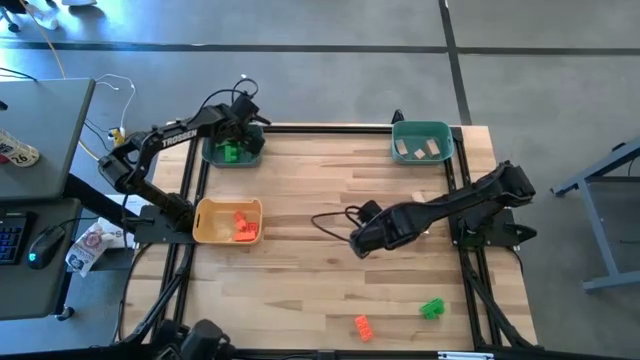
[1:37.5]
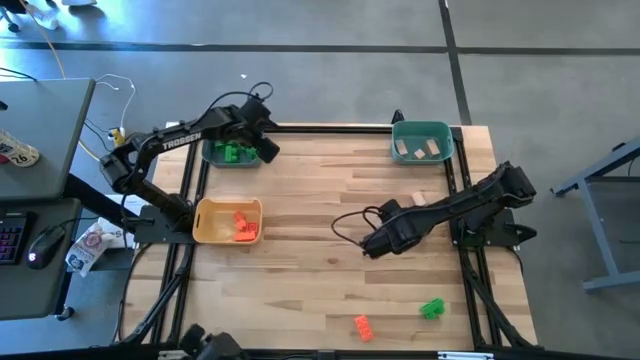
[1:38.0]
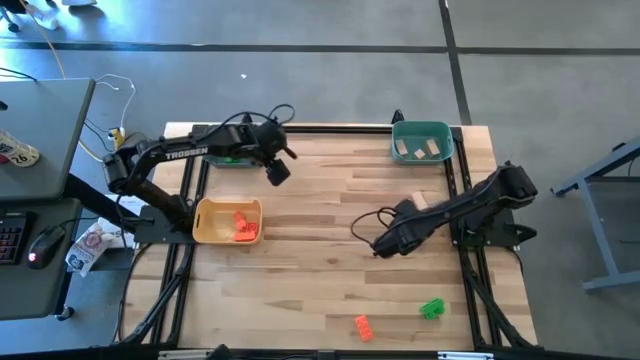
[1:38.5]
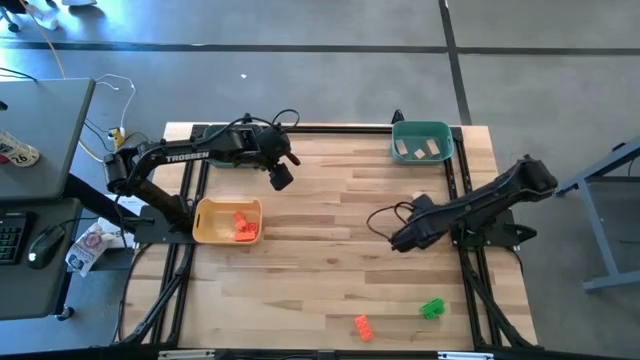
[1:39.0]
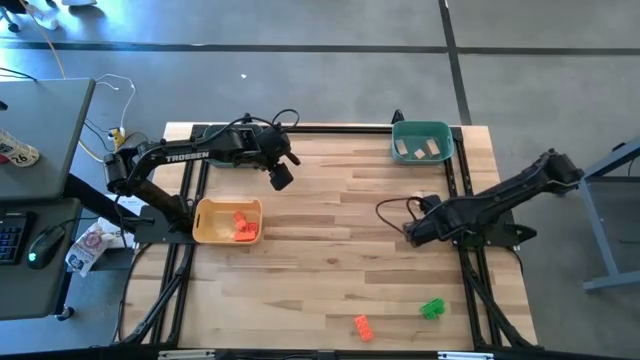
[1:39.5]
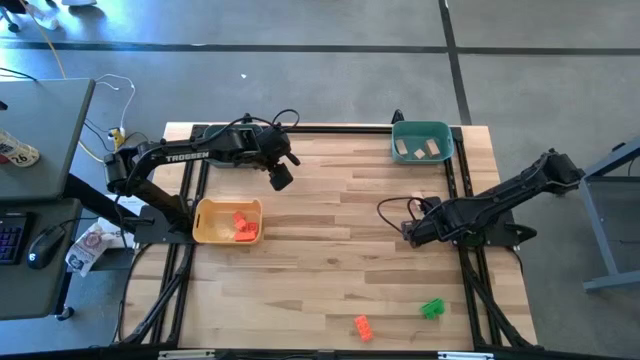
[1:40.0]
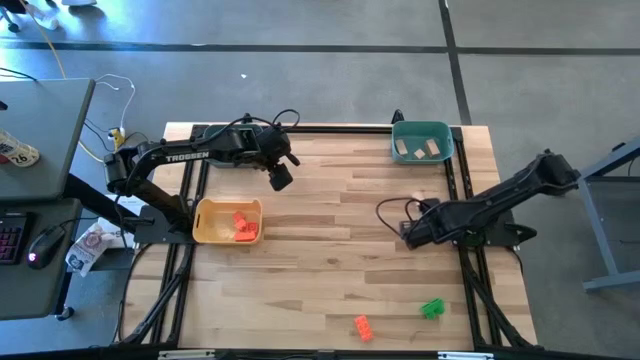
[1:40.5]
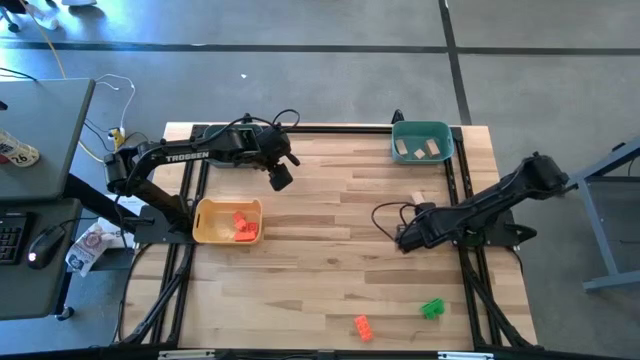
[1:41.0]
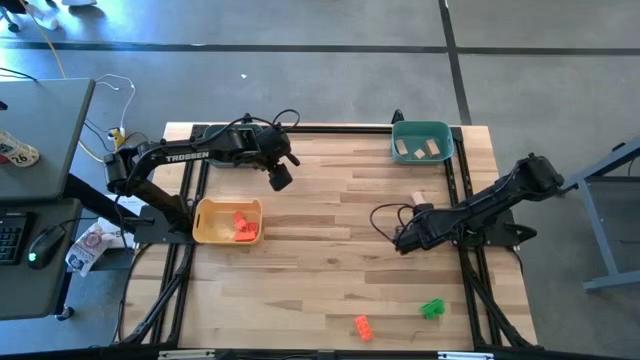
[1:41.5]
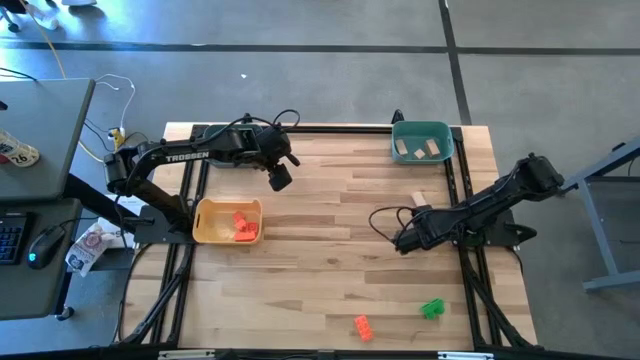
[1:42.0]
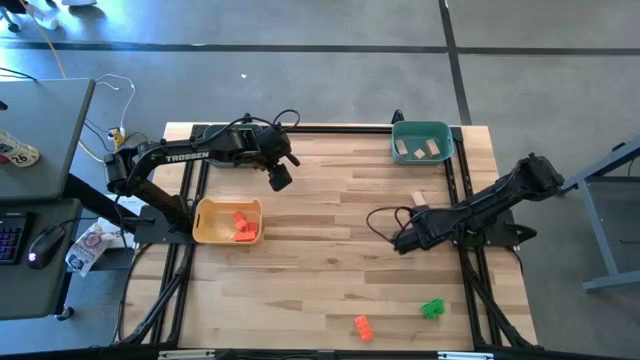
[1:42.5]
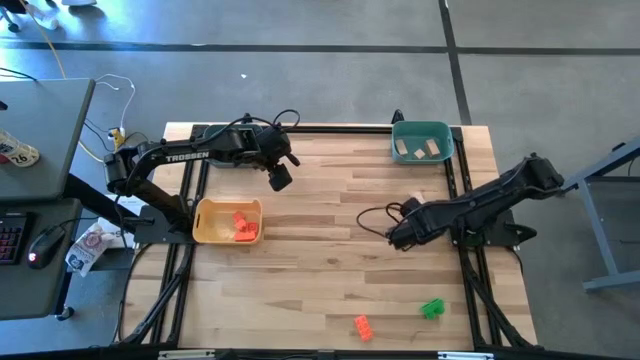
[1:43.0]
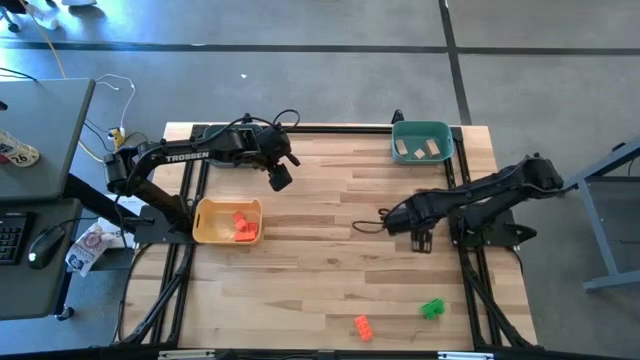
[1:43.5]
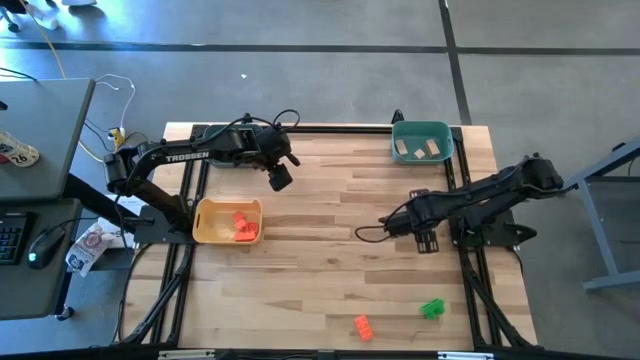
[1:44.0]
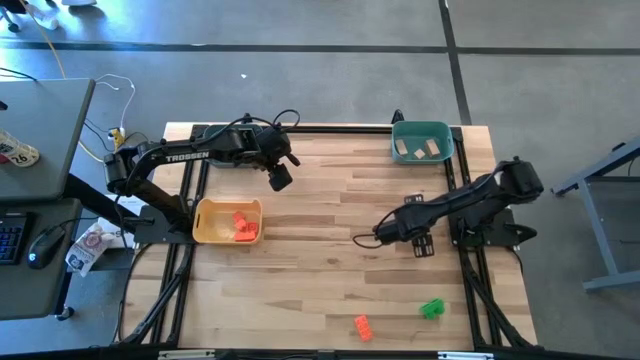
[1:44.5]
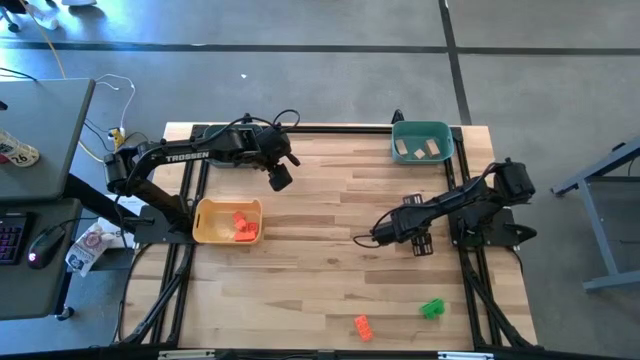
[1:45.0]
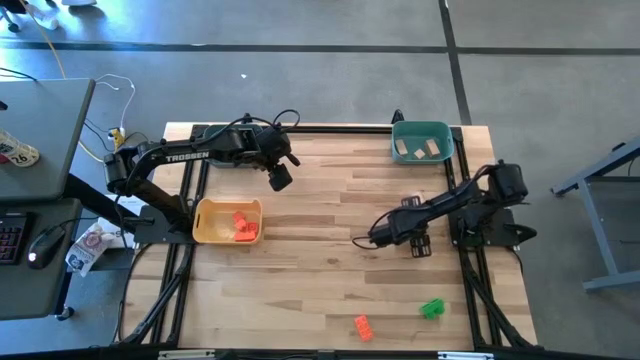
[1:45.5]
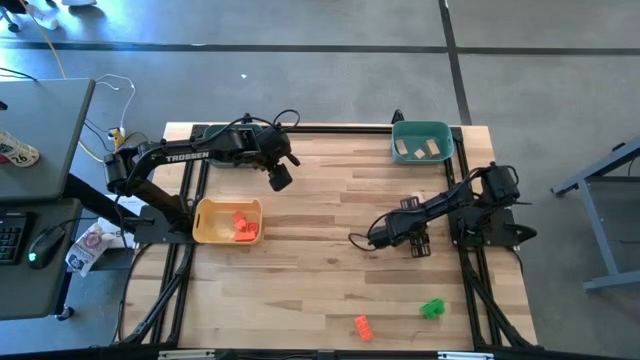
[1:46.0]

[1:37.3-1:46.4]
Task: Sort & place blocks by color
Put the brown block into the green bin

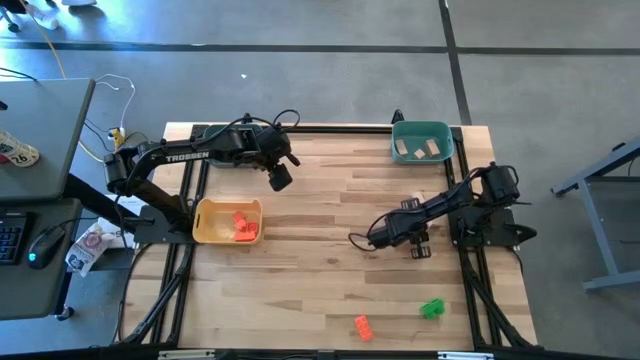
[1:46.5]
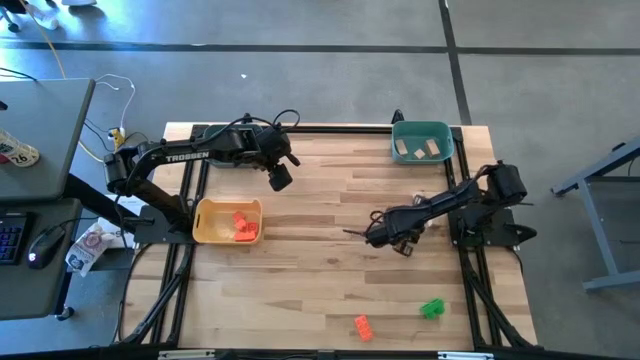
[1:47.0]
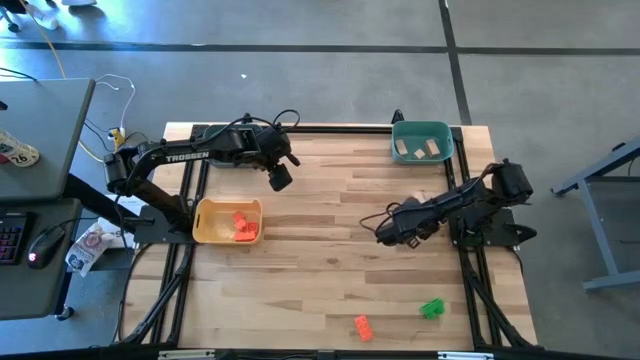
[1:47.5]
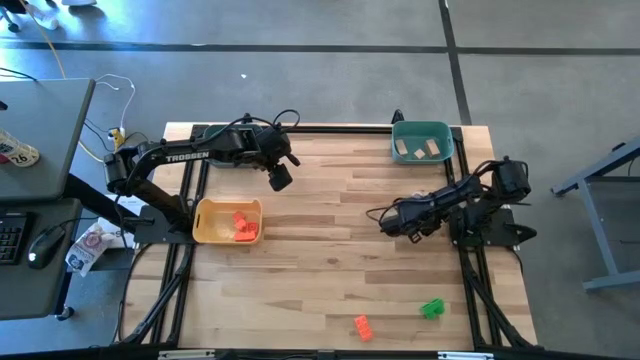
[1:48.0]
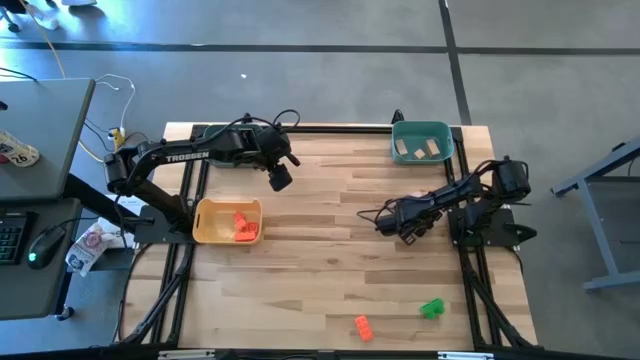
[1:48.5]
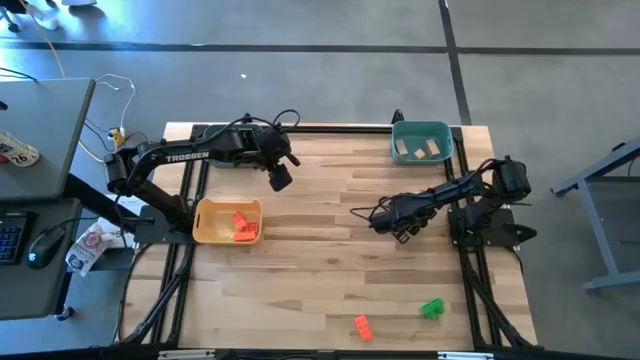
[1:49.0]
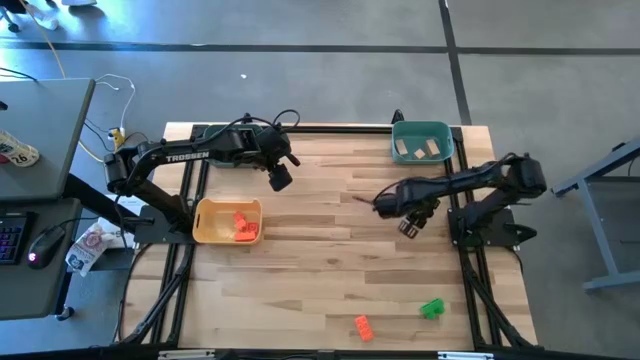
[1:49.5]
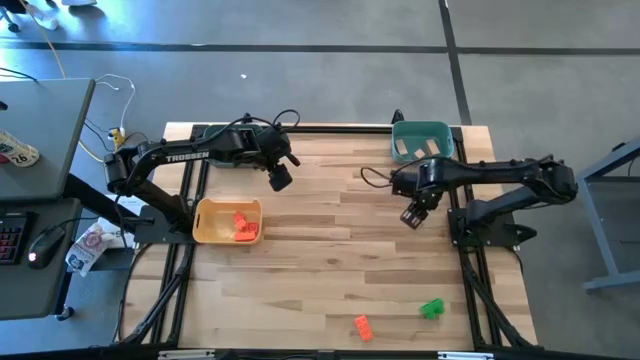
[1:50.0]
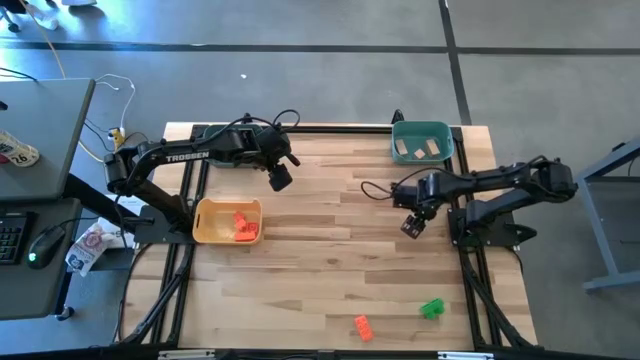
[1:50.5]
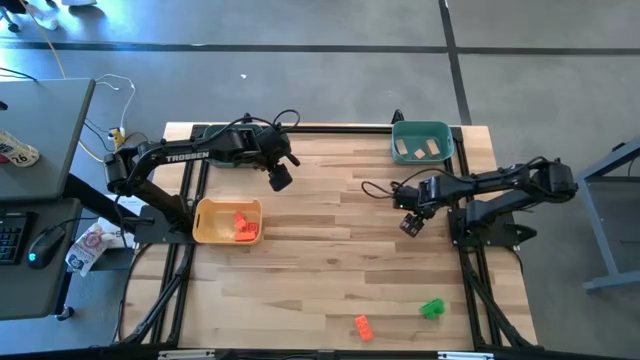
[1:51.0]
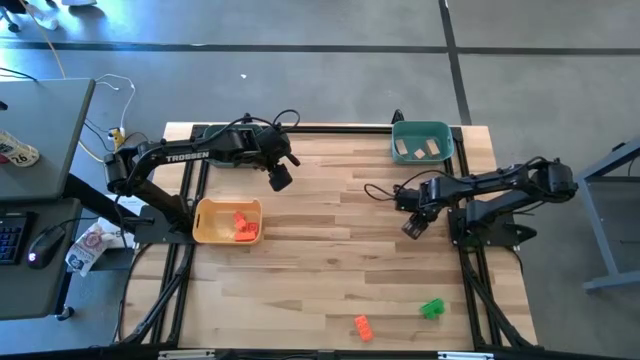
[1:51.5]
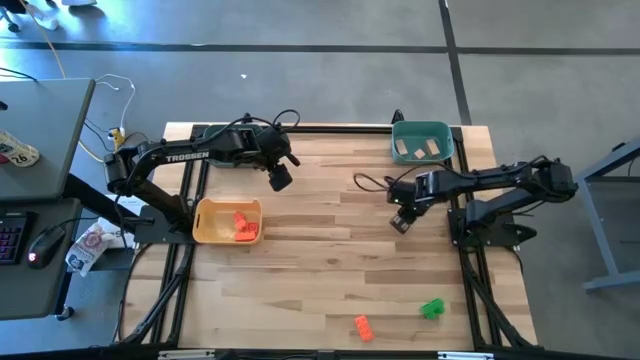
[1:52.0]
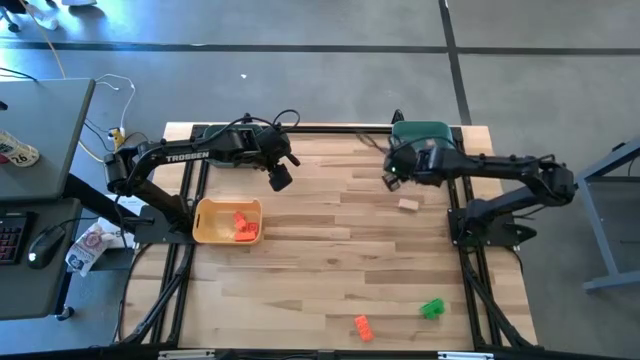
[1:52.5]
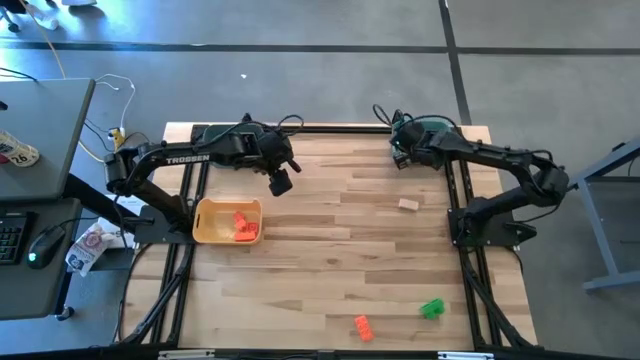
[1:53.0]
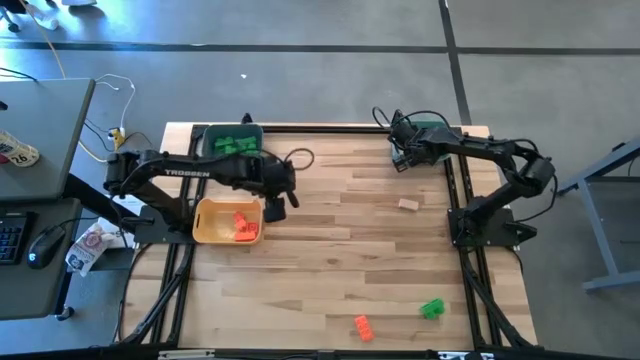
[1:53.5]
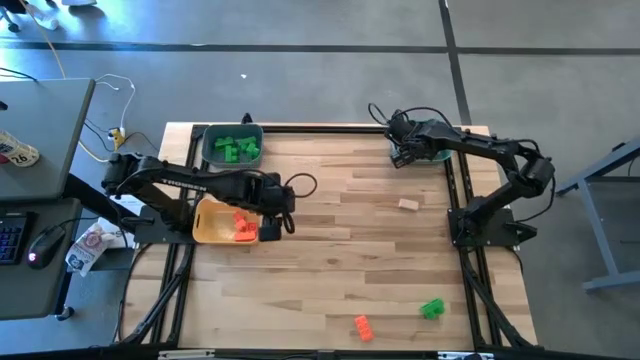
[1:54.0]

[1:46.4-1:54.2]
Put the brown block into the green bin

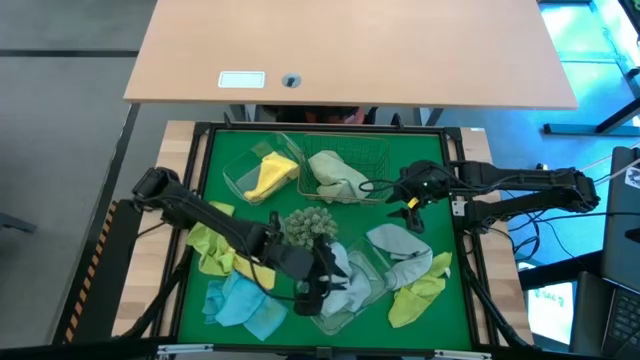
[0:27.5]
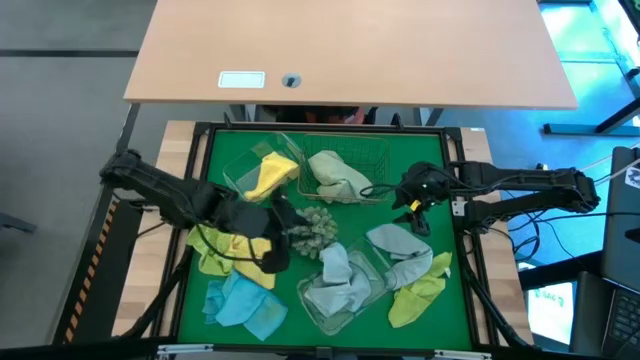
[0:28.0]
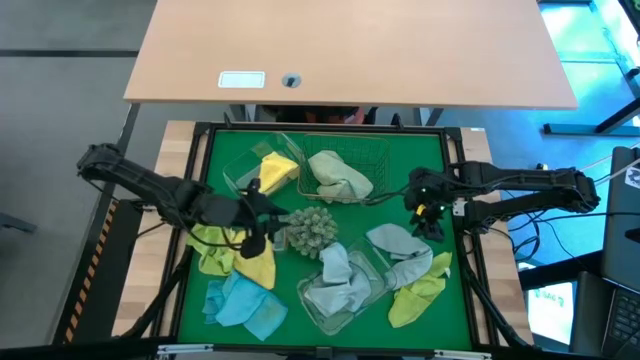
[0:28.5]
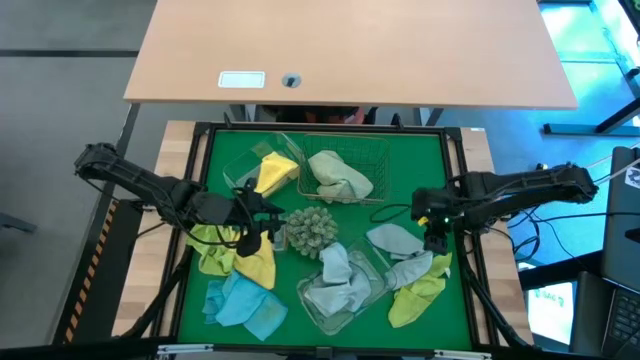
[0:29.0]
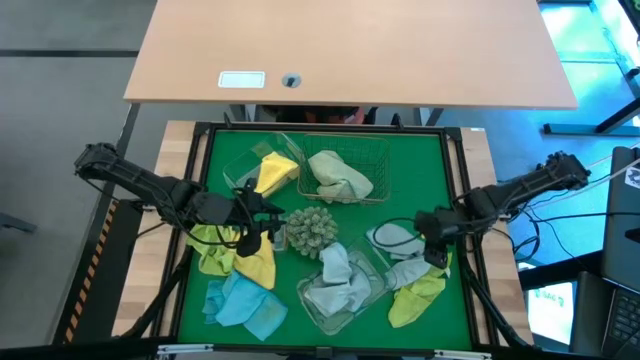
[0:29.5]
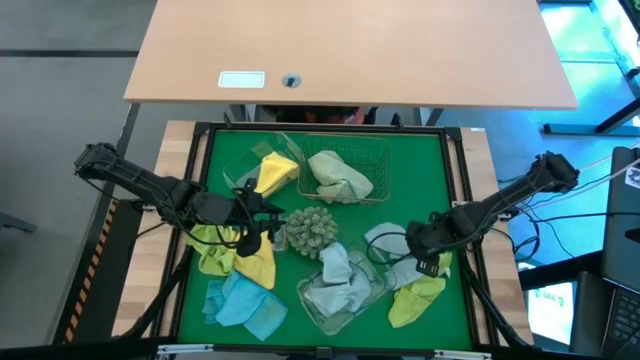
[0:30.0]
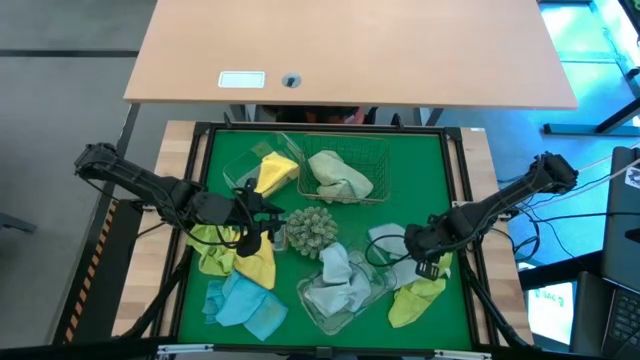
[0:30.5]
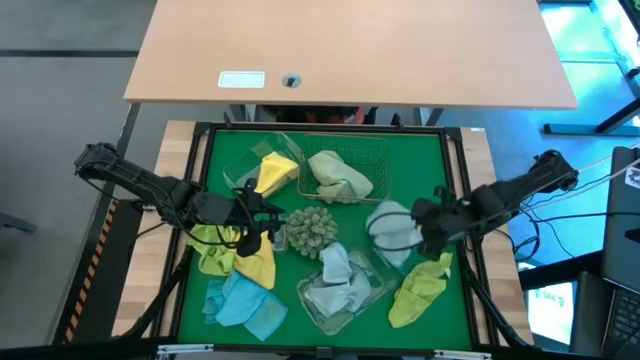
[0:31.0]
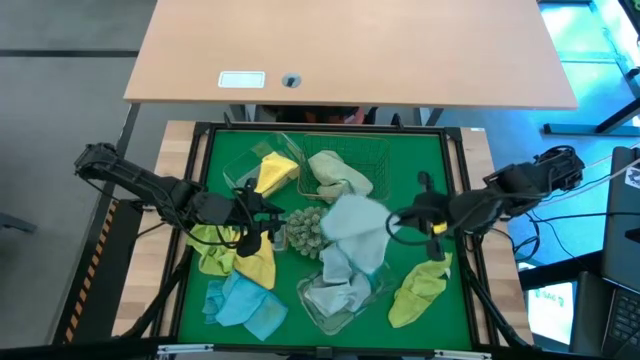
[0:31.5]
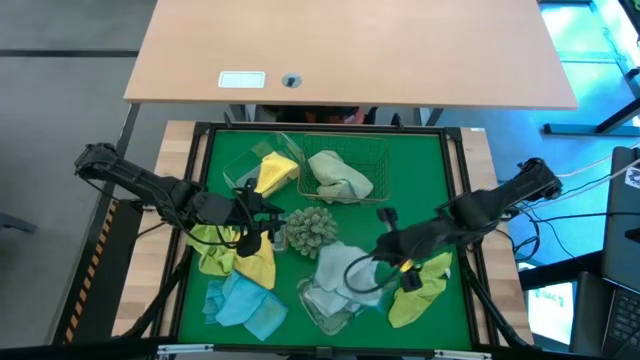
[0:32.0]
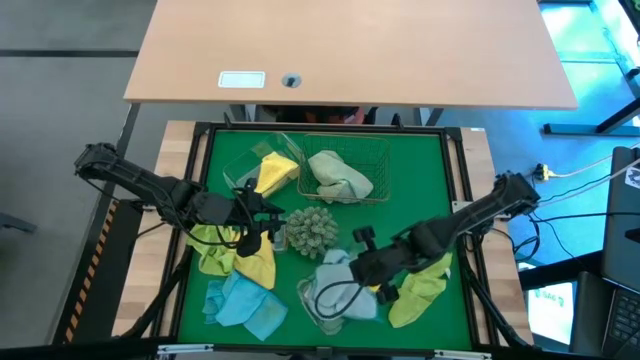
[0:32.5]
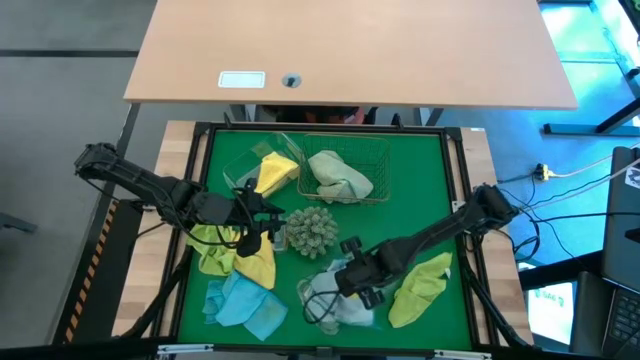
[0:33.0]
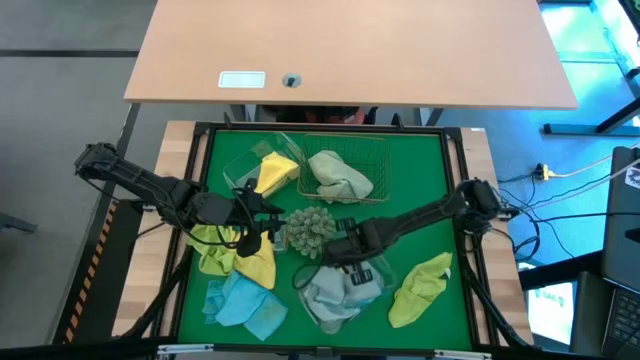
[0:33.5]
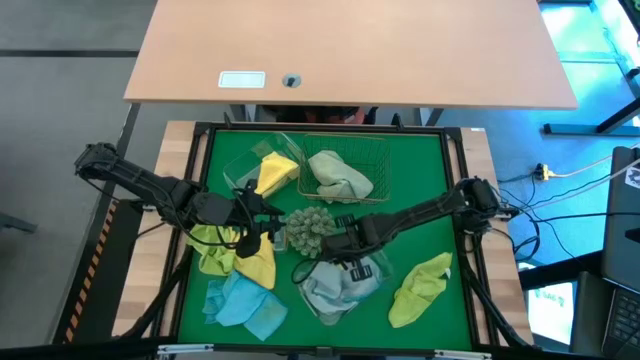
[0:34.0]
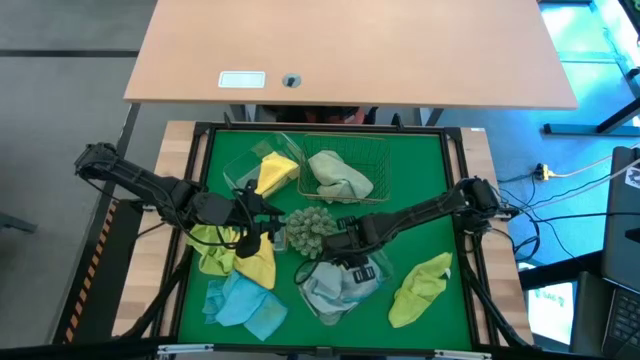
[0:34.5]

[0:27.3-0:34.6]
Task: Sort microfiber towel by color & place in baskets
Put the right light blue microfiber towel into the bottom transparent bin
